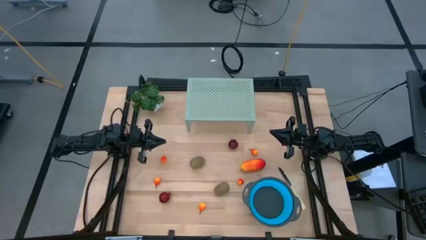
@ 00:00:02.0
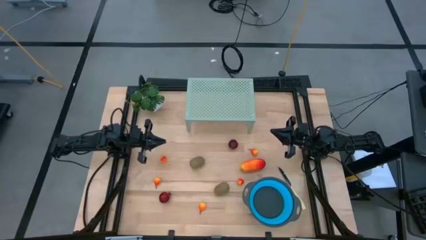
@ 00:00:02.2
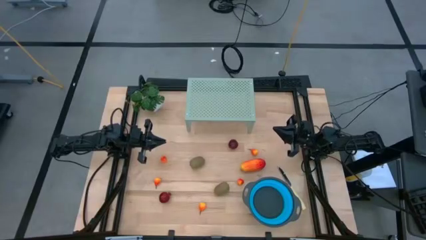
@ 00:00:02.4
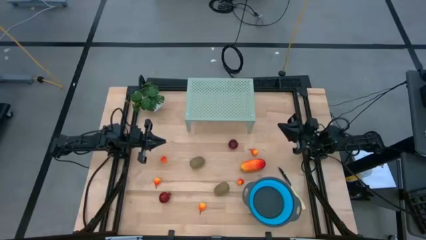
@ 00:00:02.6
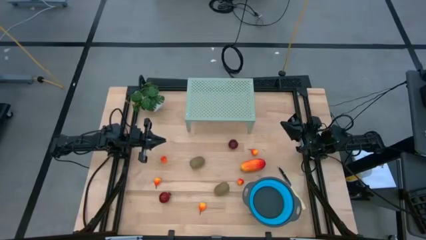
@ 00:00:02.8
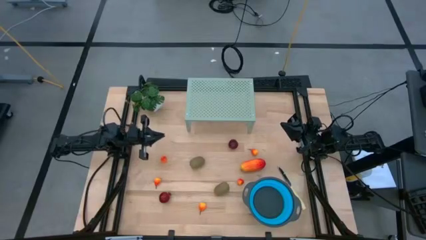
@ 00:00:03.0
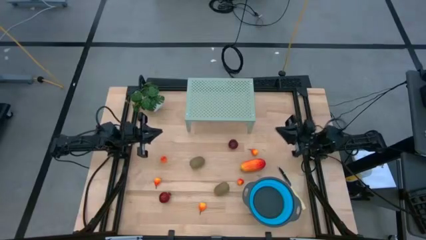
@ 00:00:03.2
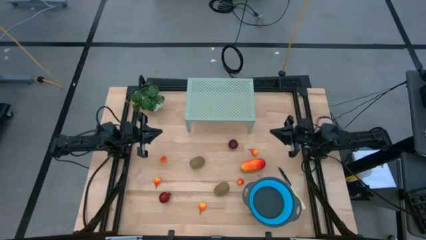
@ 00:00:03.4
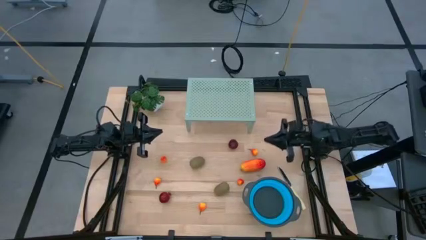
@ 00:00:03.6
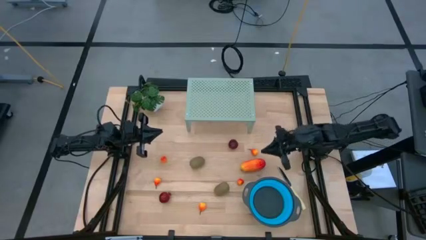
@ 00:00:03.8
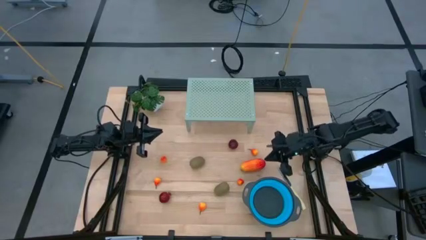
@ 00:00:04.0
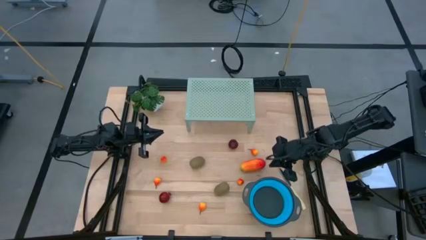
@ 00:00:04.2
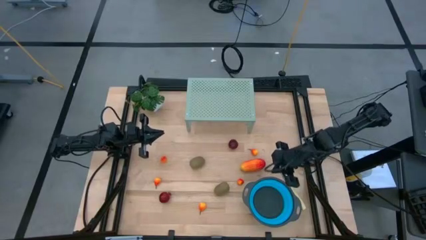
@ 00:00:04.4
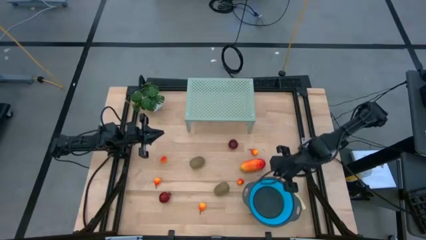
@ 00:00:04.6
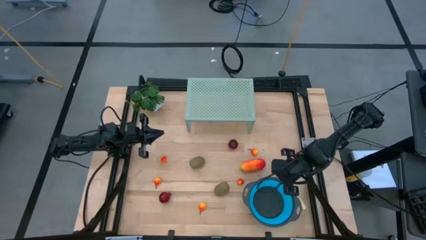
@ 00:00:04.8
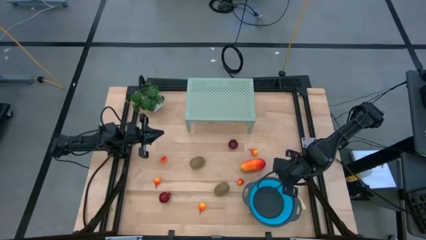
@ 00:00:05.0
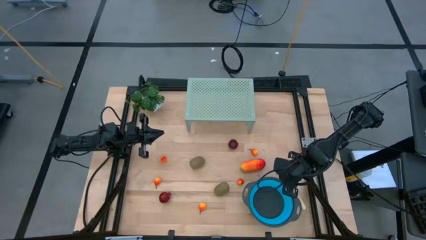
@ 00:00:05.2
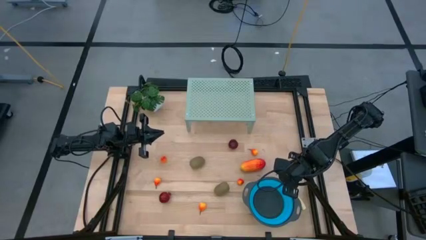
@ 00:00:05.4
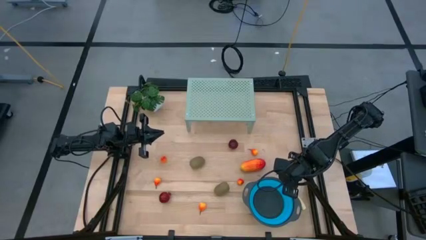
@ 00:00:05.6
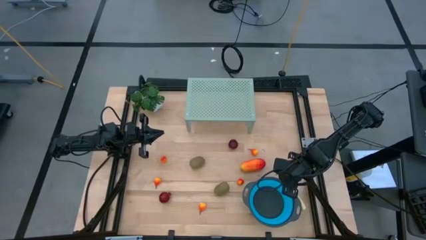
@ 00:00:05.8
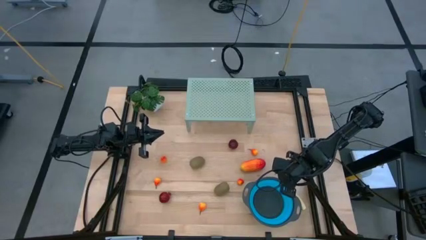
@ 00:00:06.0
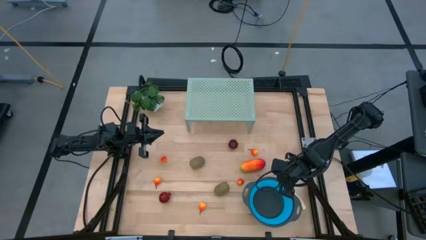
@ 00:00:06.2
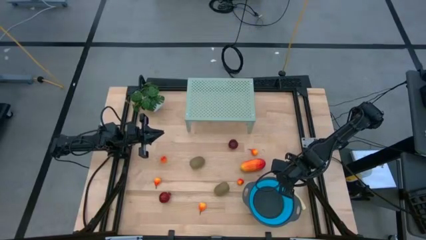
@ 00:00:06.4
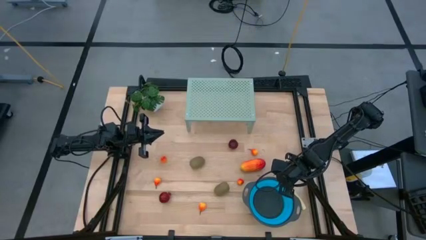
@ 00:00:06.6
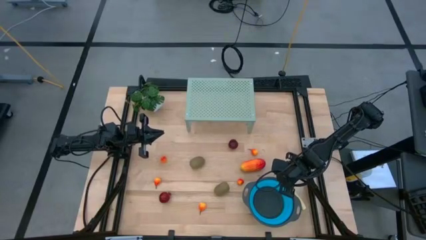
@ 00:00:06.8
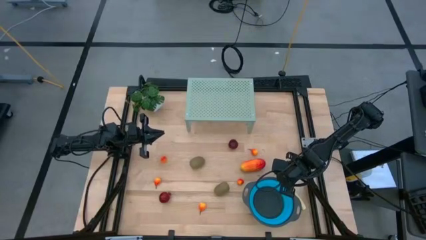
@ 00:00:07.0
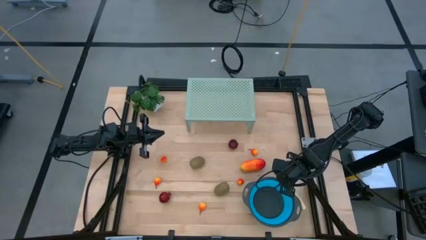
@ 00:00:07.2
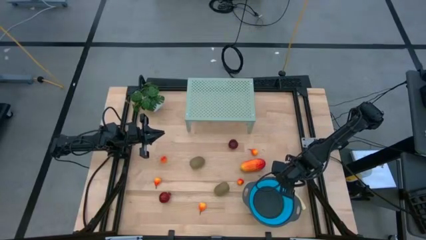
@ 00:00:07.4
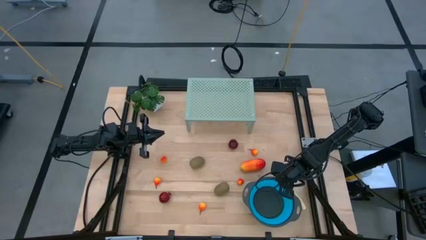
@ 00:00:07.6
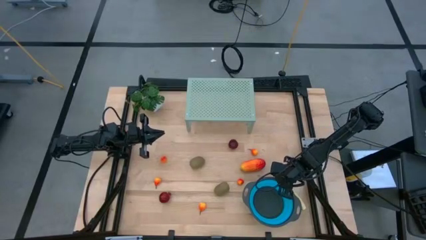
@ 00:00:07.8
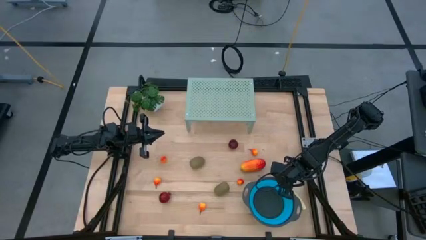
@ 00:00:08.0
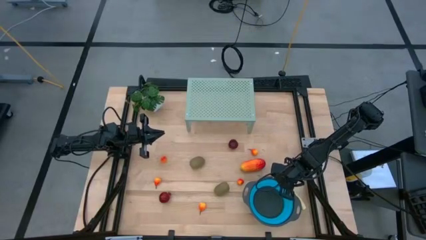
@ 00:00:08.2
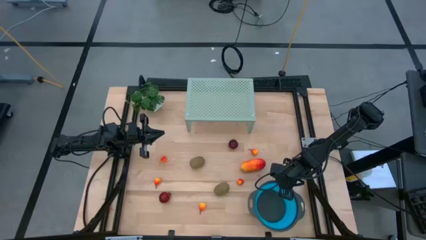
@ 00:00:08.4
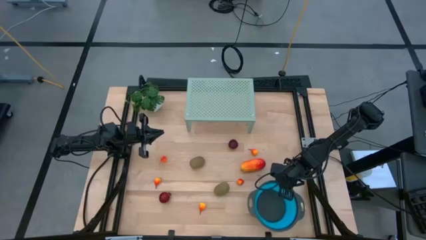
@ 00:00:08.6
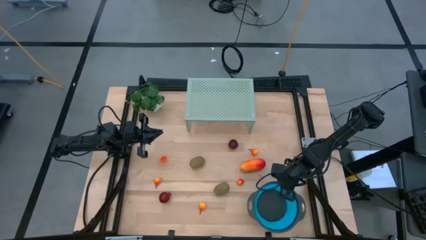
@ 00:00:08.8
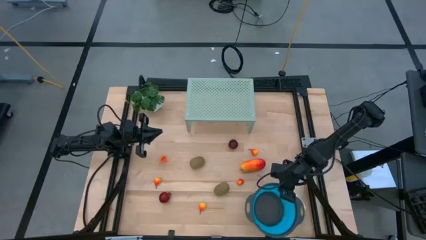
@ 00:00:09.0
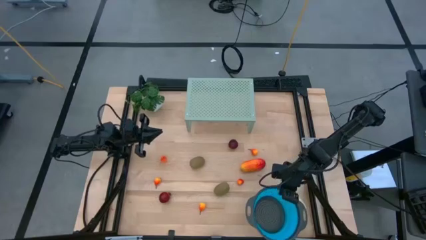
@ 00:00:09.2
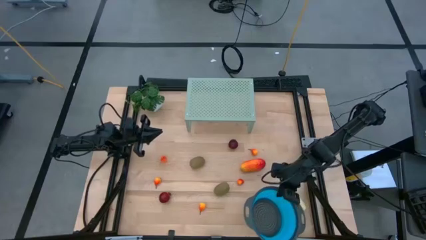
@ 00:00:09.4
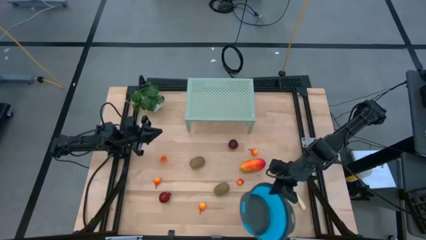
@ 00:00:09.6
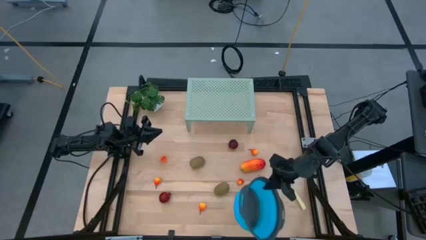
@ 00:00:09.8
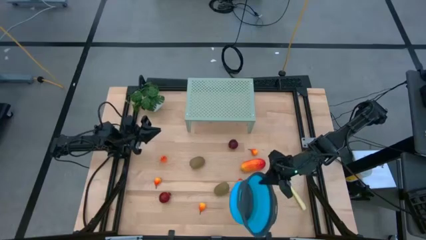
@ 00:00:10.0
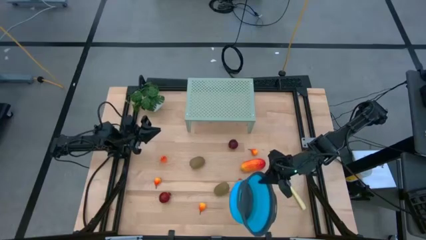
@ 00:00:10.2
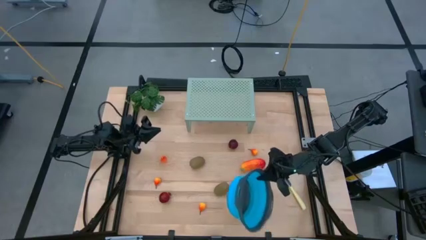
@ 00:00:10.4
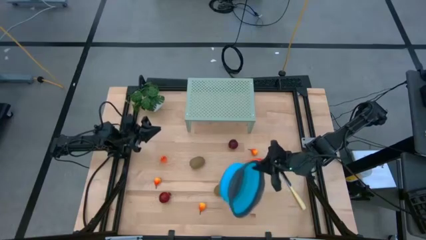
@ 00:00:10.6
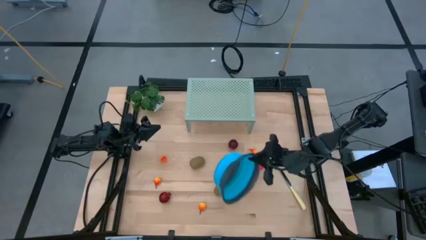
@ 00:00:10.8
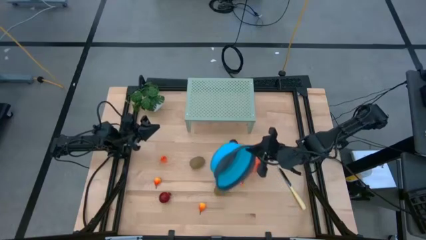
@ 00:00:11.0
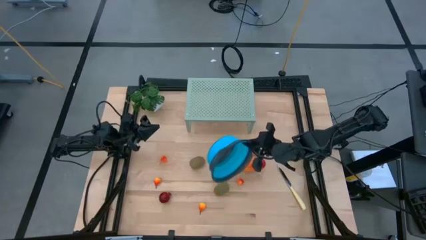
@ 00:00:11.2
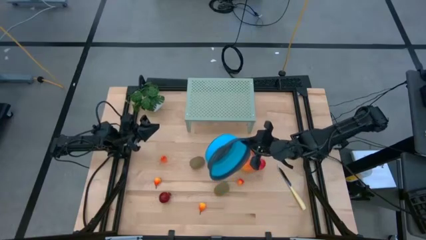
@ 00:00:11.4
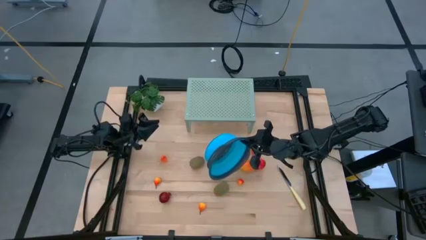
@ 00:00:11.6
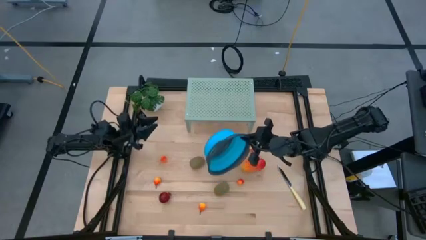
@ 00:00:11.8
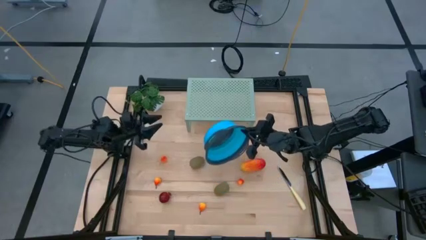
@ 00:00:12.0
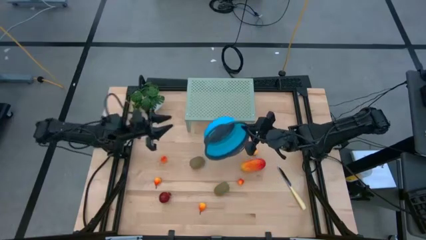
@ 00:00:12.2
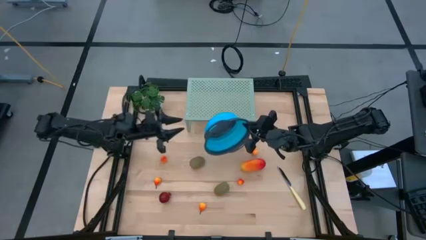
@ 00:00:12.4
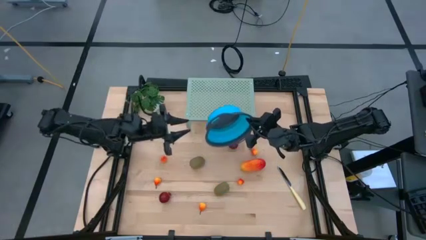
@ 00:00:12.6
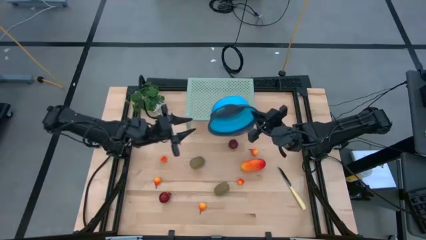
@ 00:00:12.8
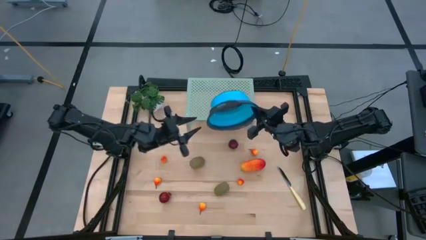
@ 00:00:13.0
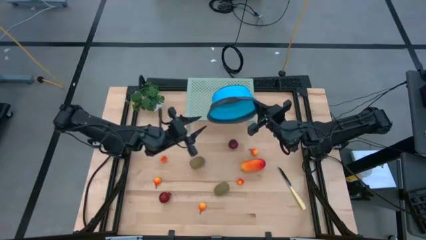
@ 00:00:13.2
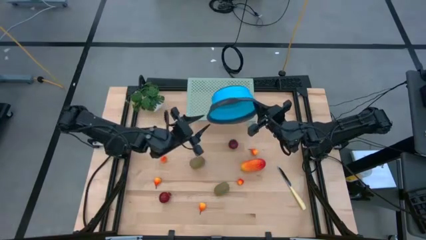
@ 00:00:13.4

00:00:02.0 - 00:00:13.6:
Task: Pick & Place Fruit
Put the blue bowl on the shelf
